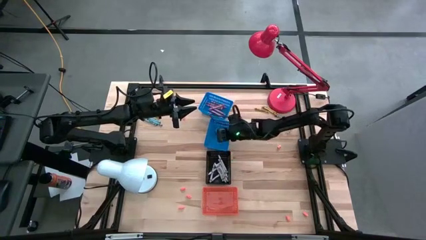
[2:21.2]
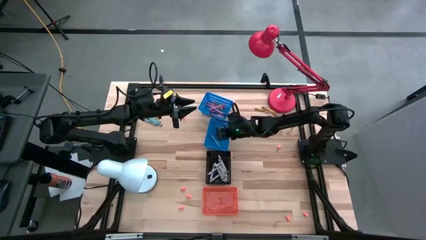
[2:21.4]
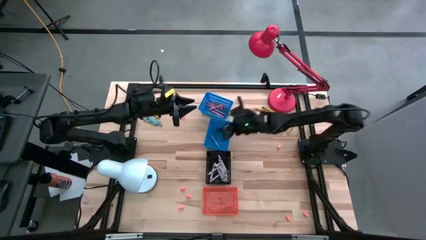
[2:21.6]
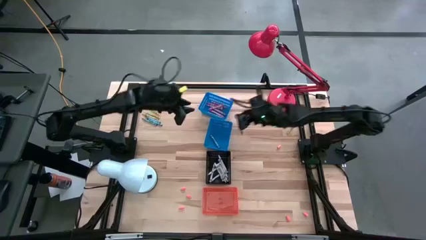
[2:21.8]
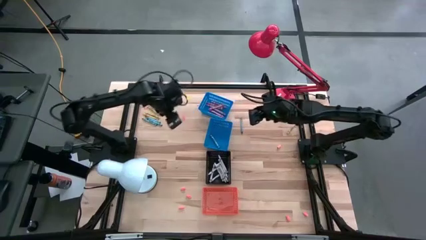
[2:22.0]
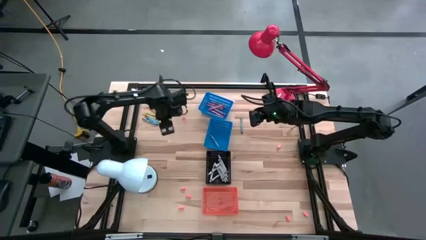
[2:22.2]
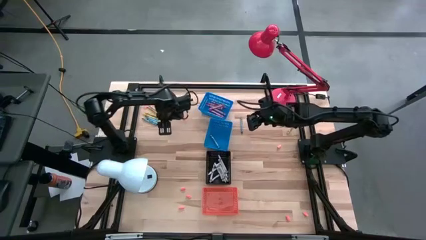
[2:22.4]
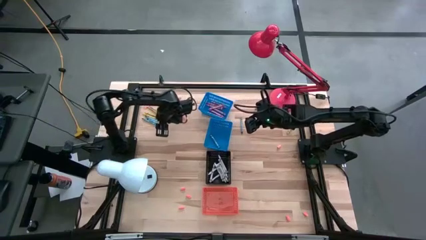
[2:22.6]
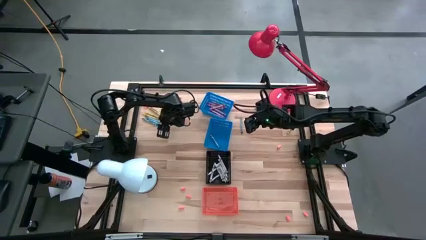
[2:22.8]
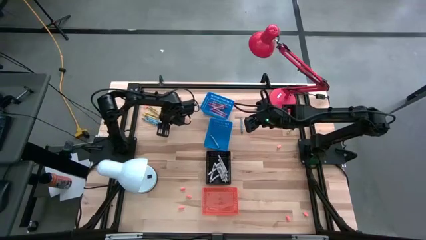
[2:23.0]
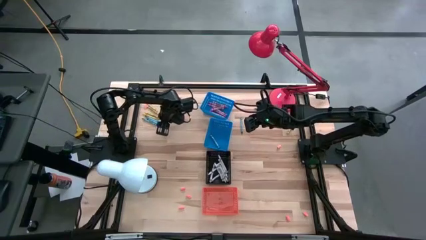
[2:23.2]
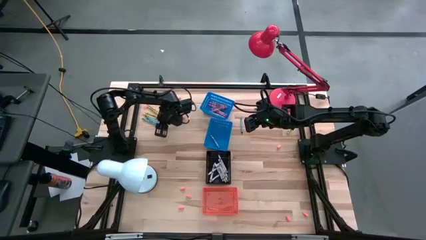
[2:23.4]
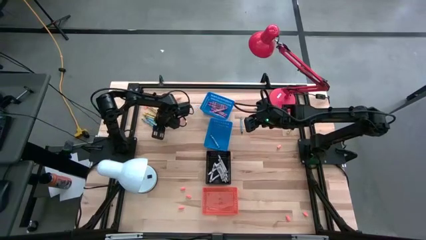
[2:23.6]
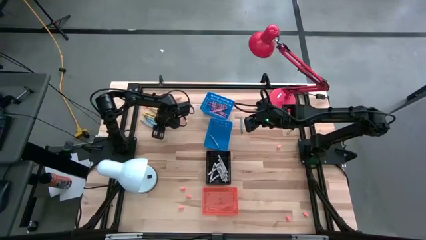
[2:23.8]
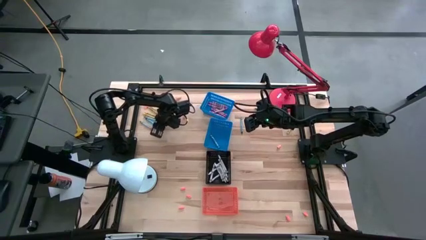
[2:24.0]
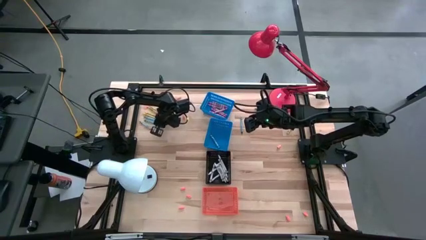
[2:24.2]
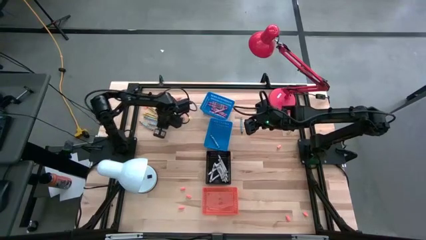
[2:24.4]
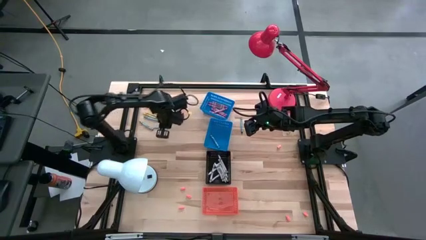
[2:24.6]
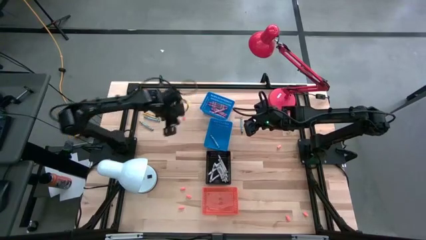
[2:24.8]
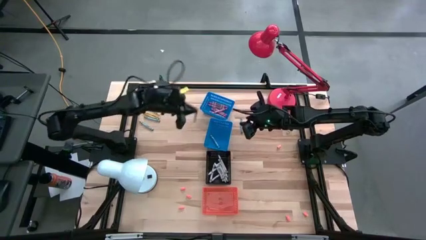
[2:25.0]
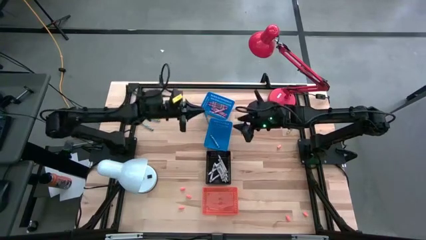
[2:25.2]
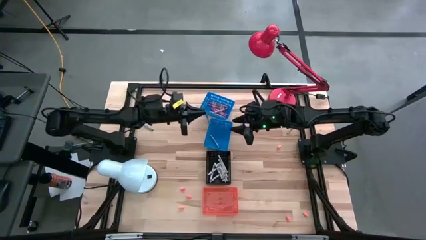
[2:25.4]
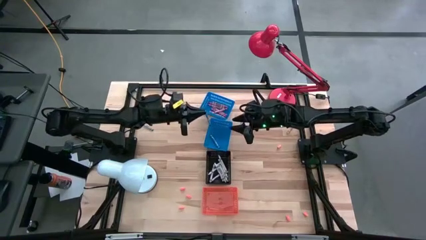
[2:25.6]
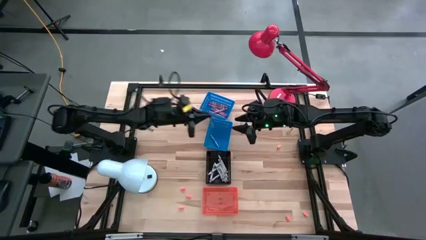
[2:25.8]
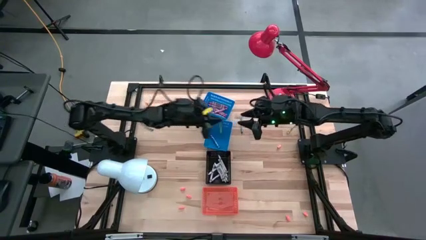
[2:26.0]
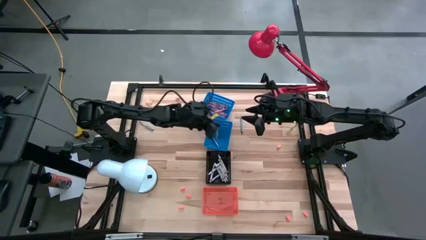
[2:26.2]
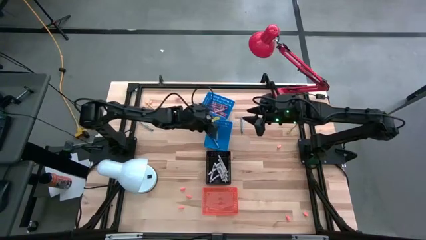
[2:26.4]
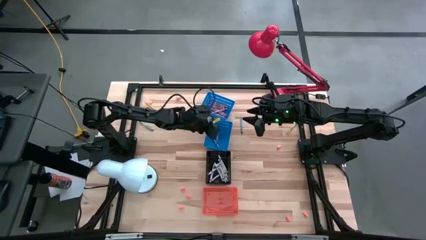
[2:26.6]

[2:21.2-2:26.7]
Task: Sort crayons
Put the blue crayon into the bottom blue bin

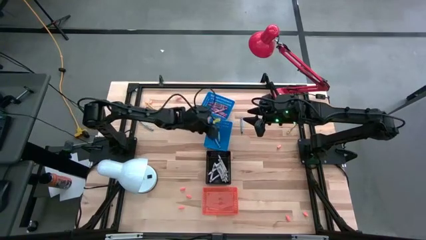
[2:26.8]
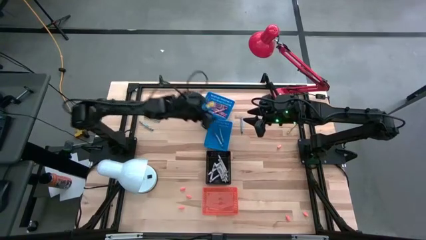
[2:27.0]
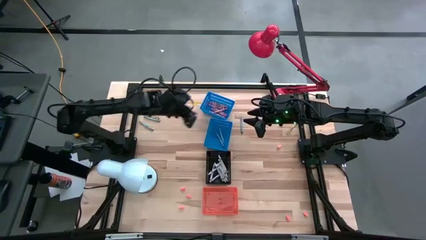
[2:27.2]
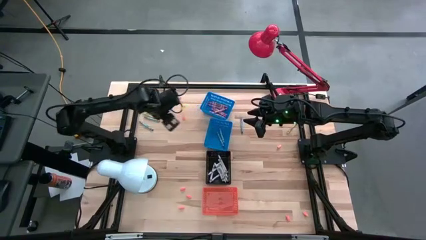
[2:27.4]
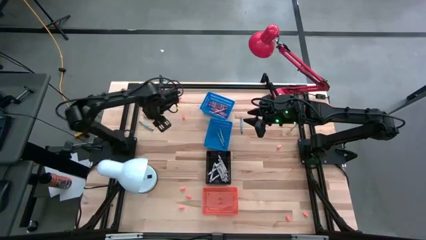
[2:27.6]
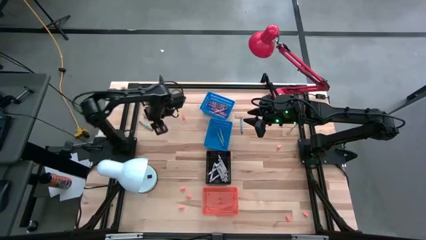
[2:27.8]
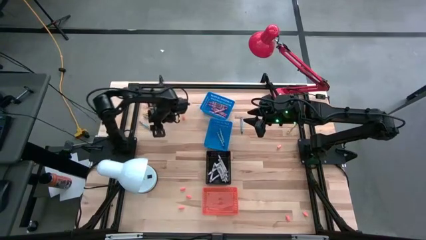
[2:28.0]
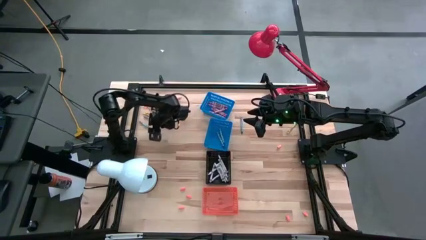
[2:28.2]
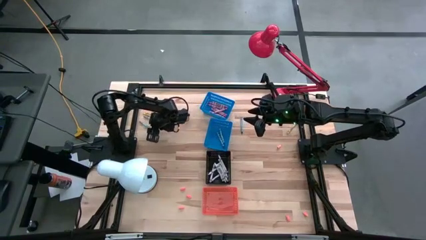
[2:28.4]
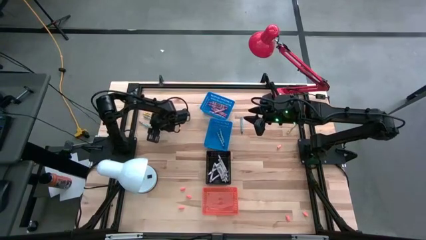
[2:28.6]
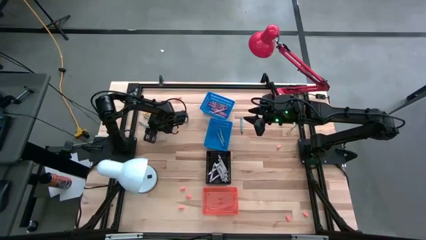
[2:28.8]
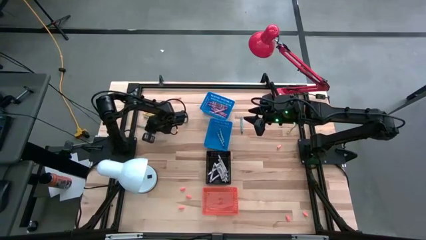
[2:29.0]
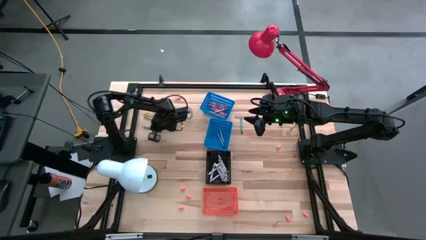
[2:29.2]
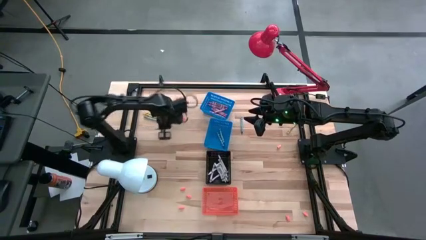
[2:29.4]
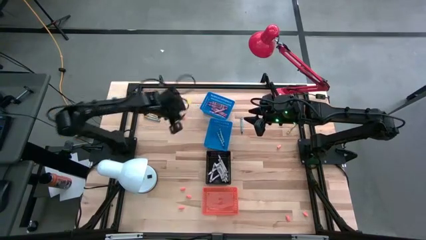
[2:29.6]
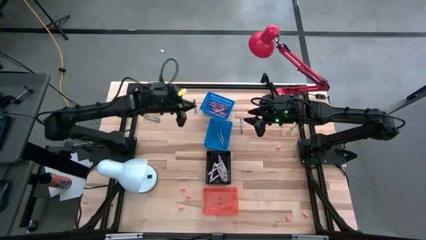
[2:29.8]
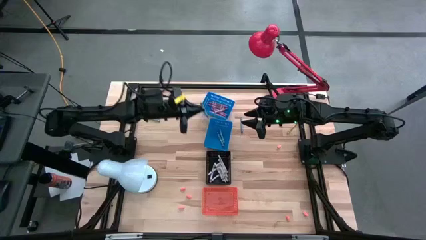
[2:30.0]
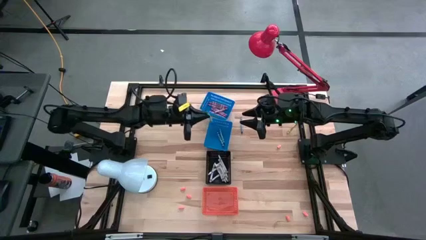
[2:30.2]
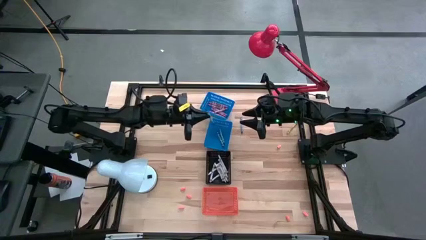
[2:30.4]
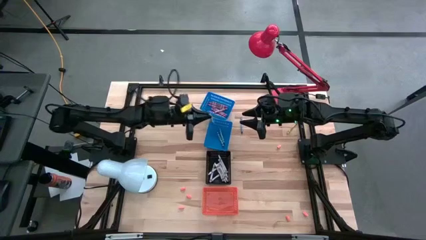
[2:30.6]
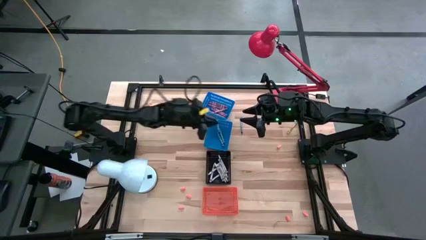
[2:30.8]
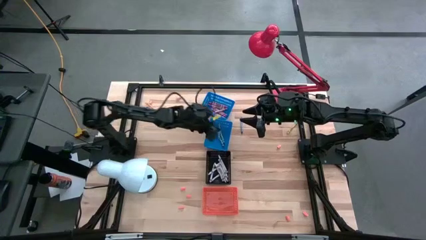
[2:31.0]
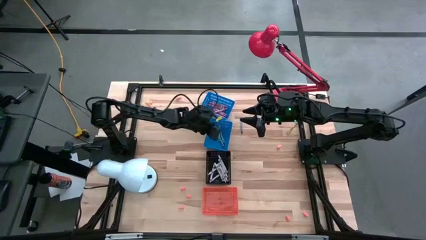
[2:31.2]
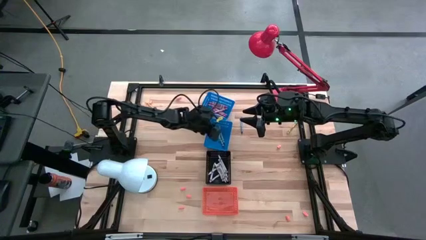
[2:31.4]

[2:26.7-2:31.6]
Put the blue crayon into the bottom blue bin

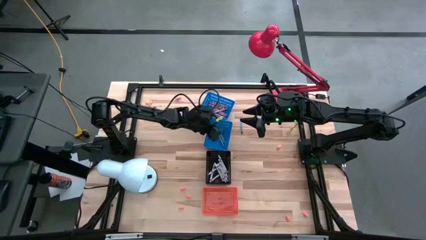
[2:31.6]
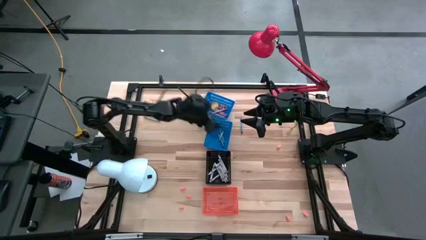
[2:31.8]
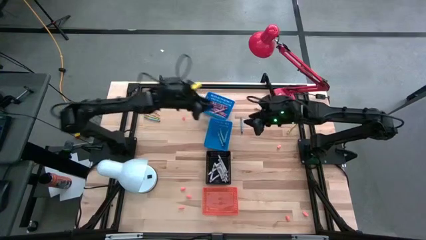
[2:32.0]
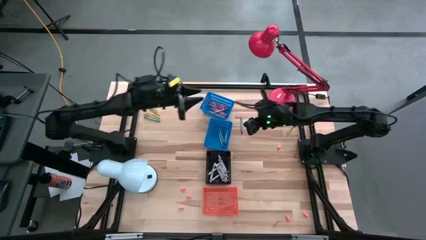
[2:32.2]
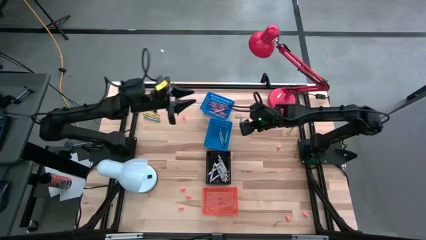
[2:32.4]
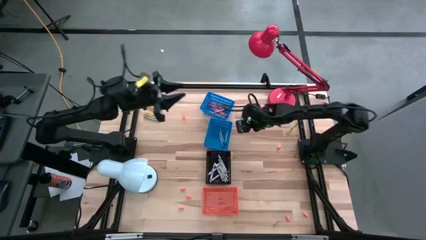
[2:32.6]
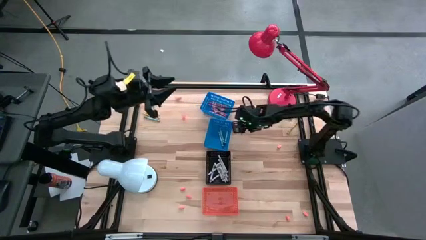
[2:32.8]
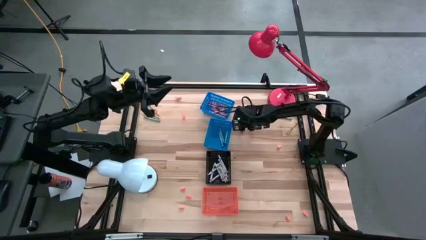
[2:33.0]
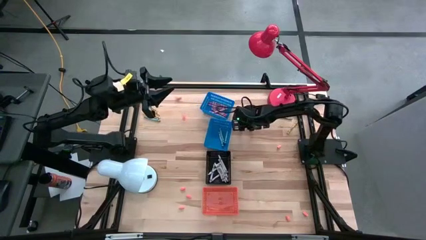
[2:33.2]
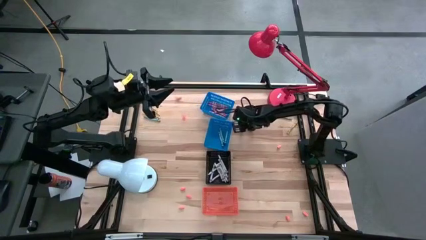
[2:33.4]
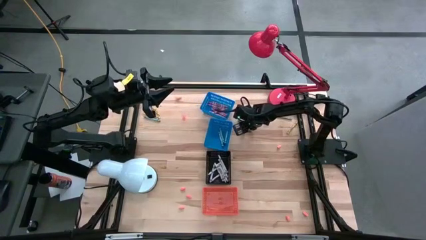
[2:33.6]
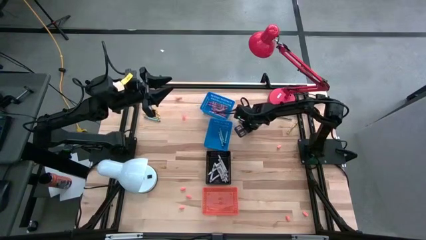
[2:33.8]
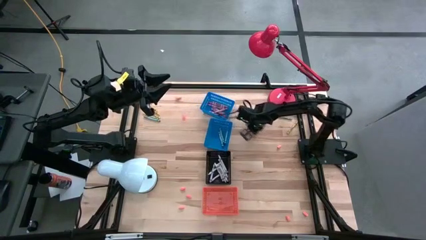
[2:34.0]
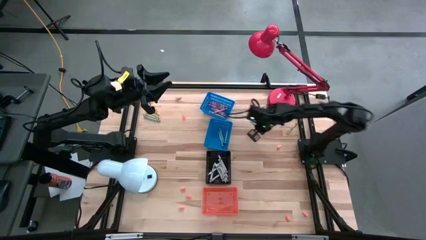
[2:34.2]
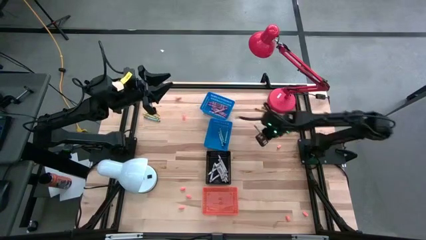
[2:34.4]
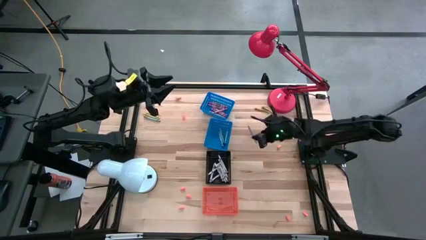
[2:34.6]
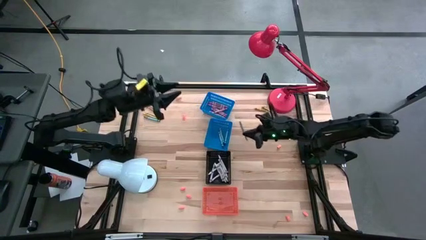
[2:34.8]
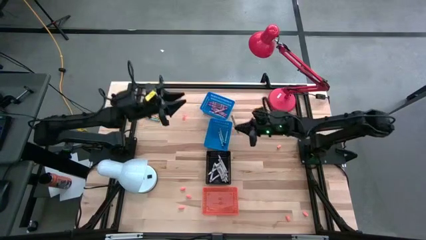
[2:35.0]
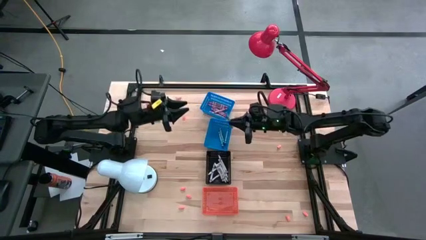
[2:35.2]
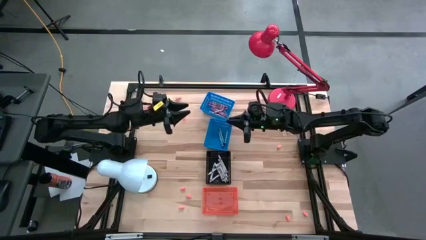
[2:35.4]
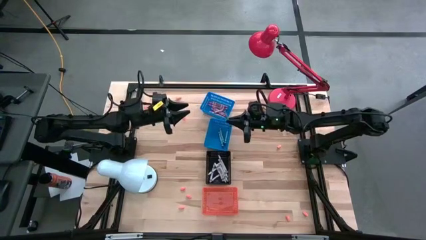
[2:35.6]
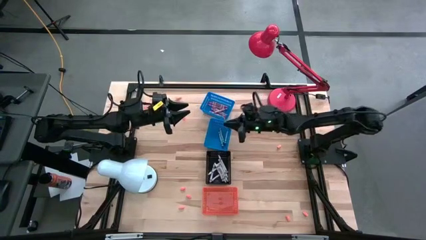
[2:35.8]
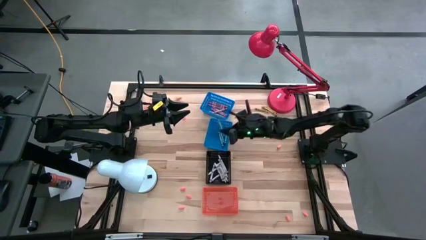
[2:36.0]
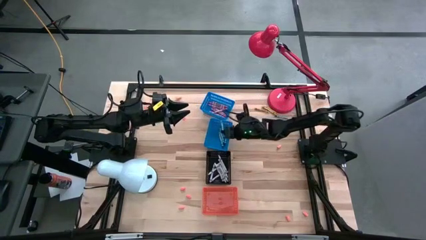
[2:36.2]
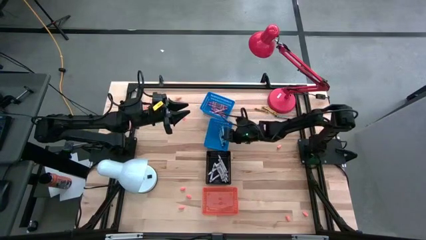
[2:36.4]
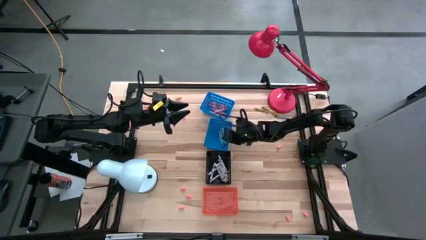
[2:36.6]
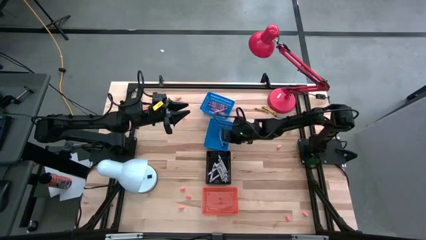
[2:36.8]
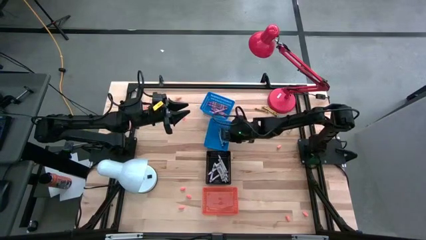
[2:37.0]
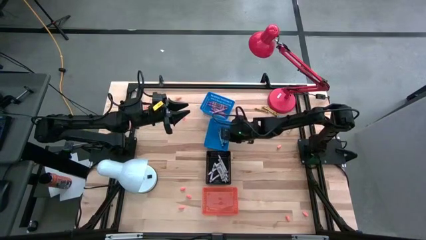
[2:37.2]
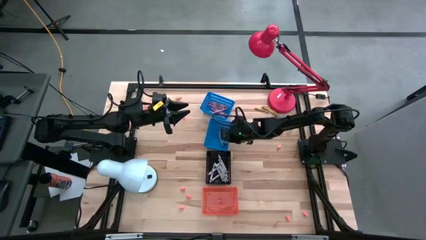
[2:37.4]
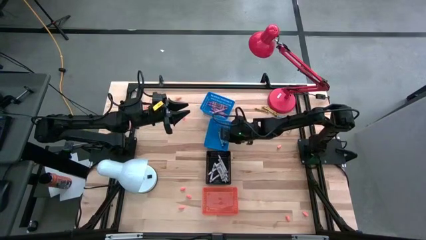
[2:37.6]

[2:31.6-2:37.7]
Put the blue crayon into the bottom blue bin
